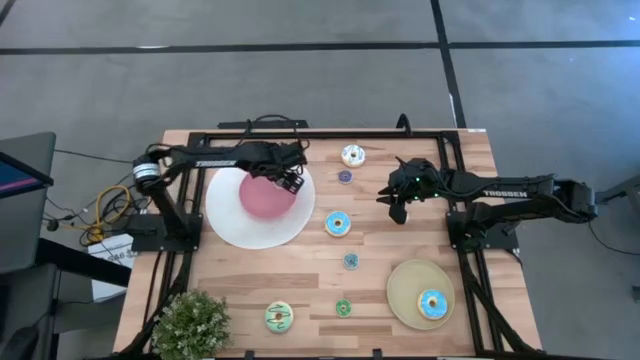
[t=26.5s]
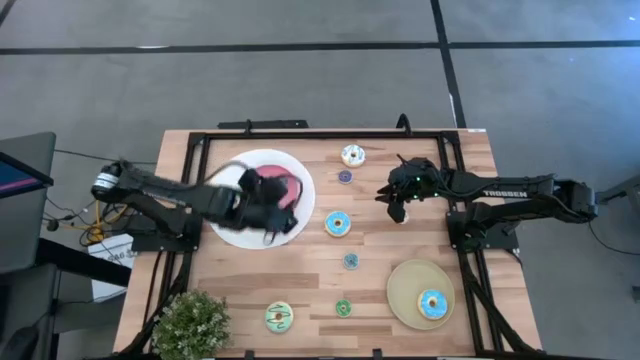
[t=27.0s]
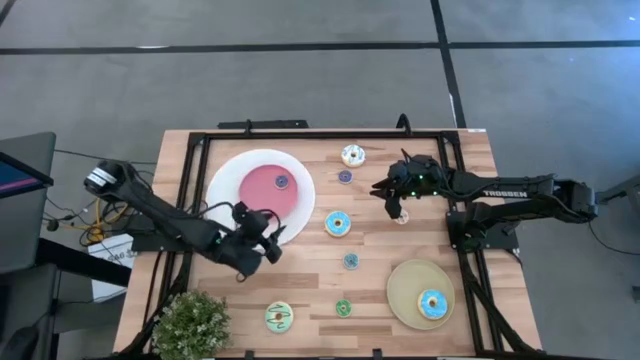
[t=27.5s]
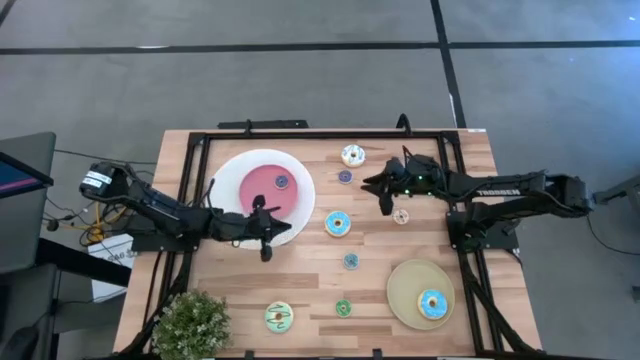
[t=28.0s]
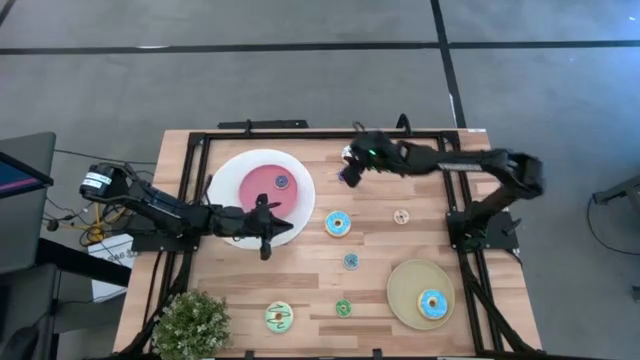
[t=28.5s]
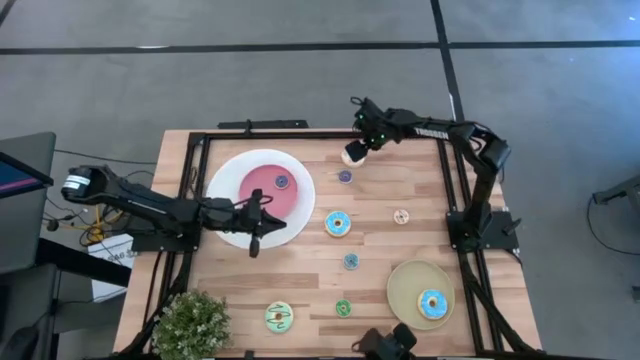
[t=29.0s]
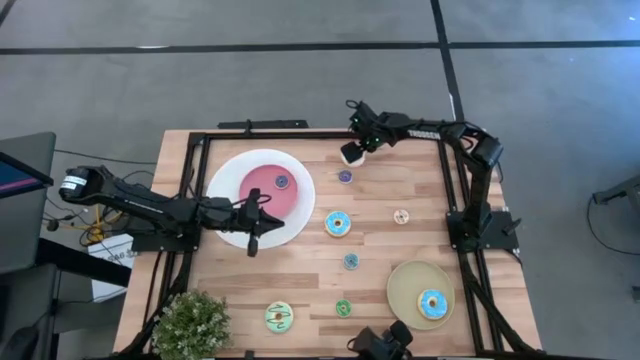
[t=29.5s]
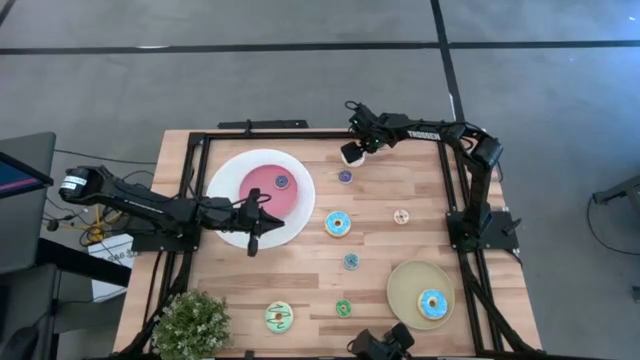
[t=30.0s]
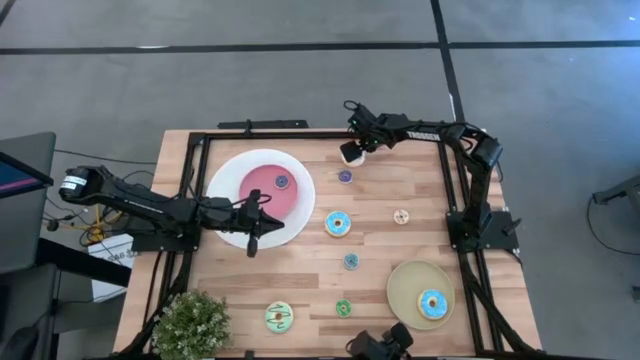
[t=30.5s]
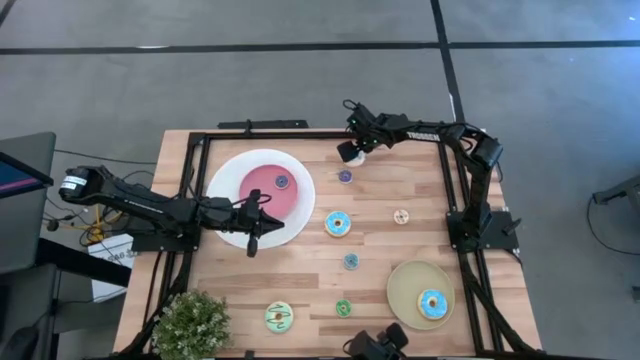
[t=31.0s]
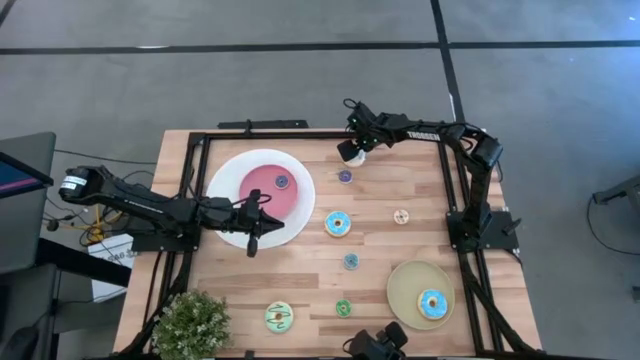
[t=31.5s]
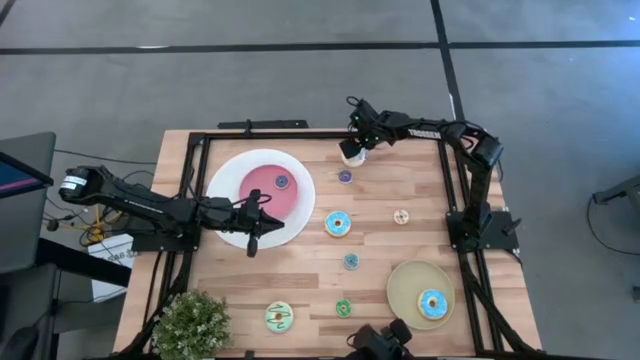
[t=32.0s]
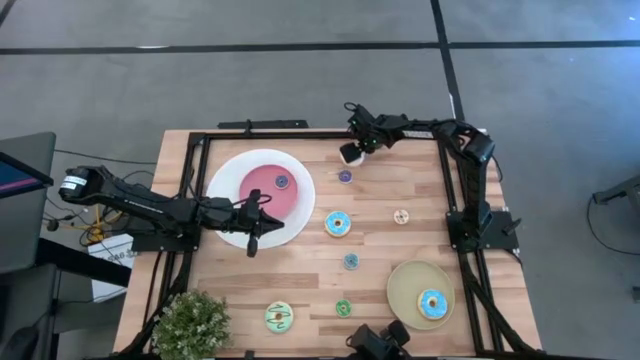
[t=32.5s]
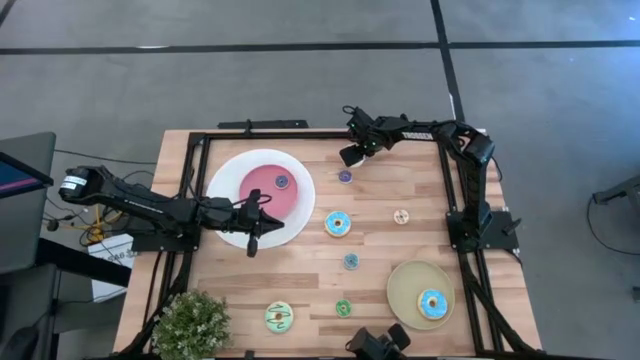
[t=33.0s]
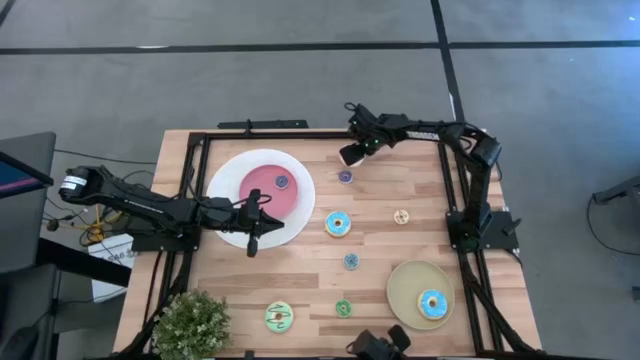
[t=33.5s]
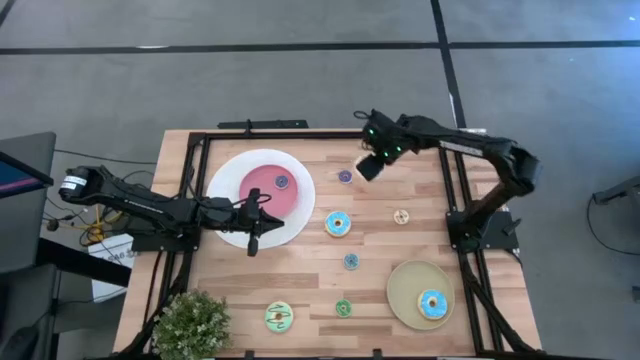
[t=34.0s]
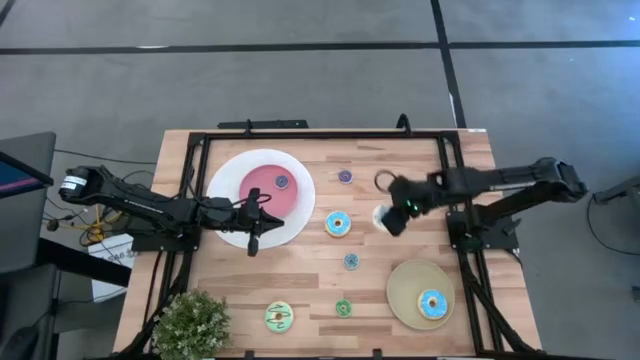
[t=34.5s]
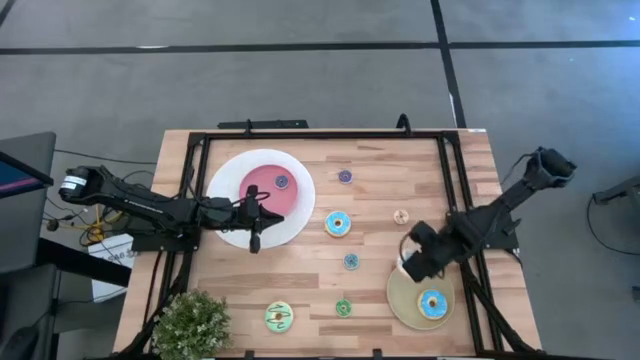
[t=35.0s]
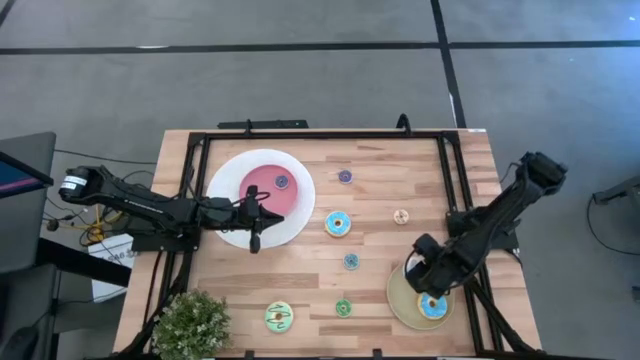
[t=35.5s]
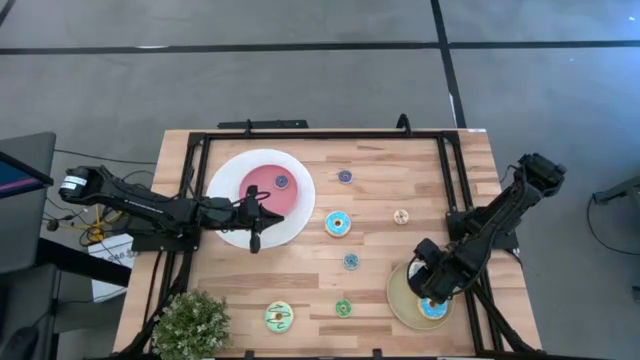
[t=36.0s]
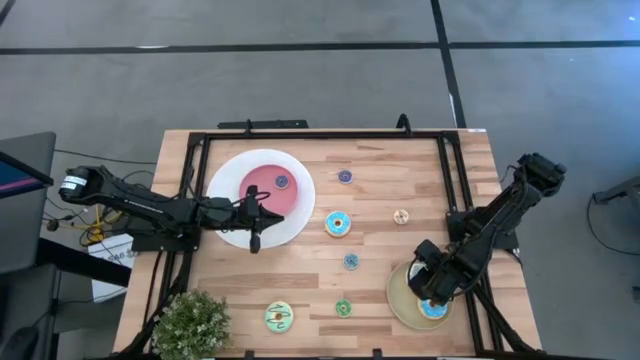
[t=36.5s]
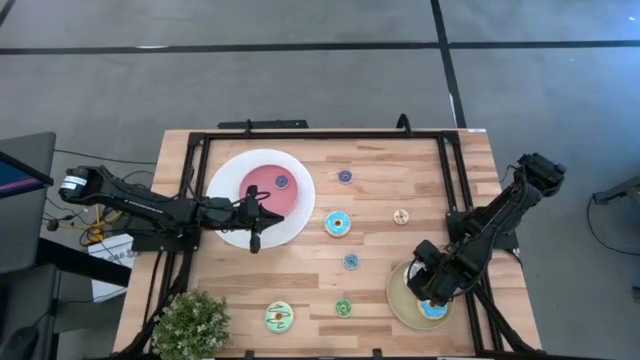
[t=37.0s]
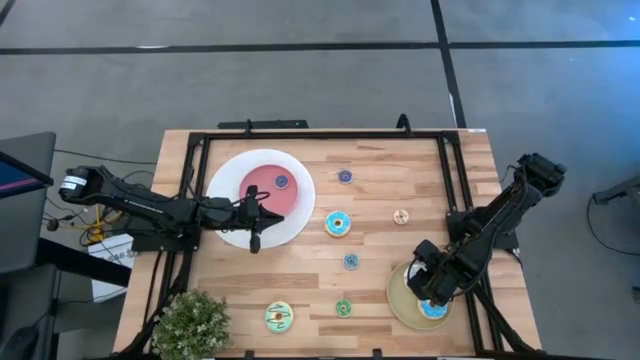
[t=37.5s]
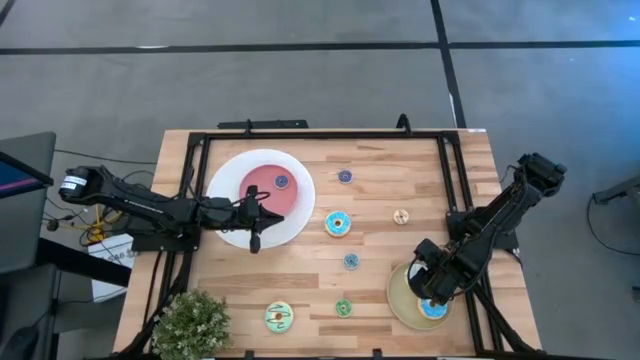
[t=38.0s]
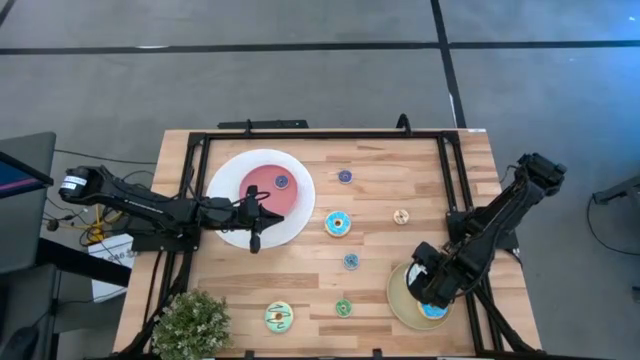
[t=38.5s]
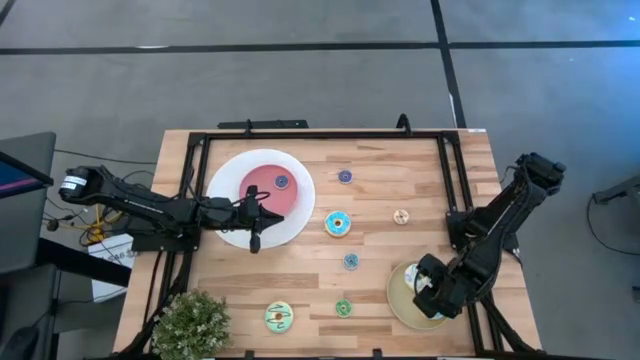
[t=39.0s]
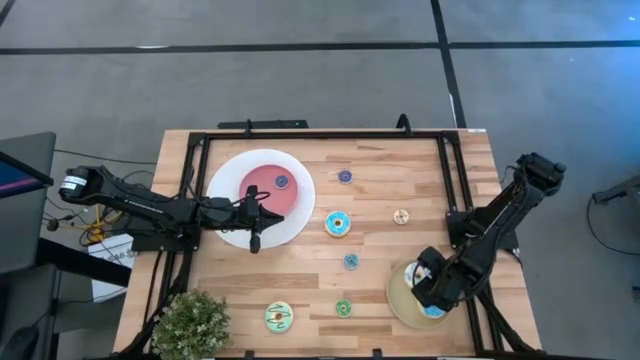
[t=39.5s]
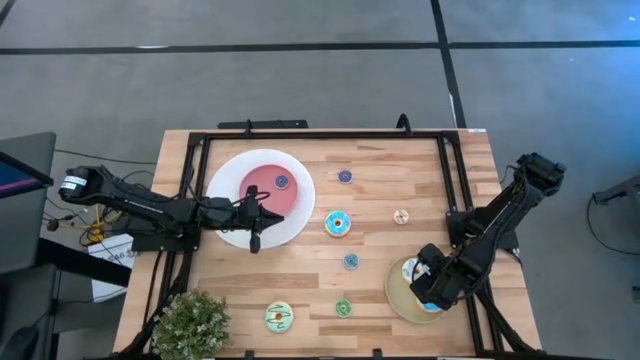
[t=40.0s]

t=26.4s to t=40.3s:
Task: Pick & Place donuts
Put the large white donut onto the brown plate

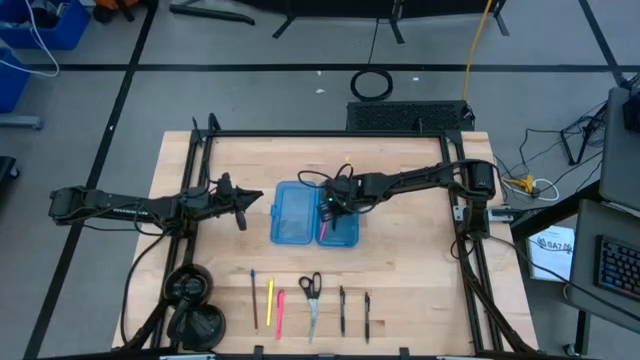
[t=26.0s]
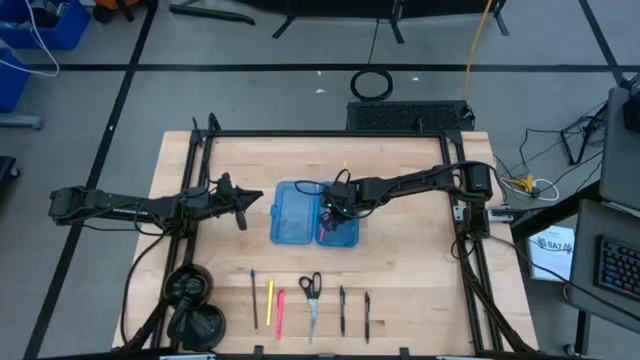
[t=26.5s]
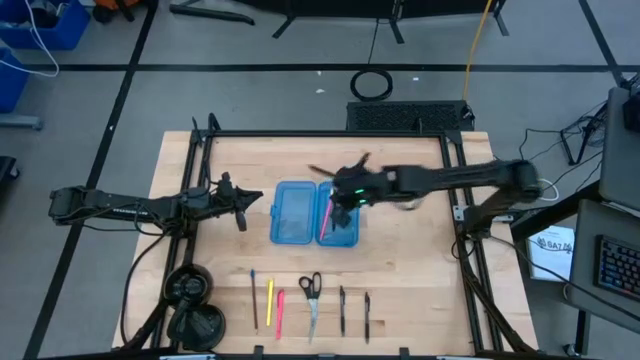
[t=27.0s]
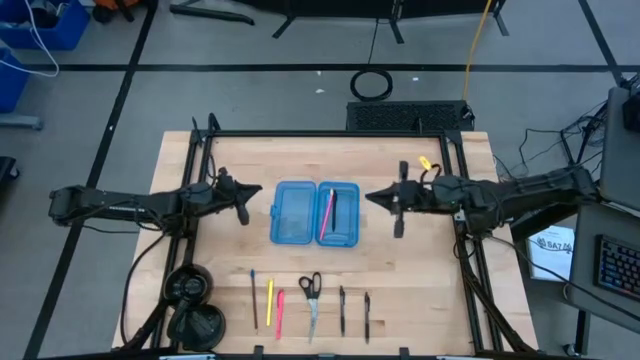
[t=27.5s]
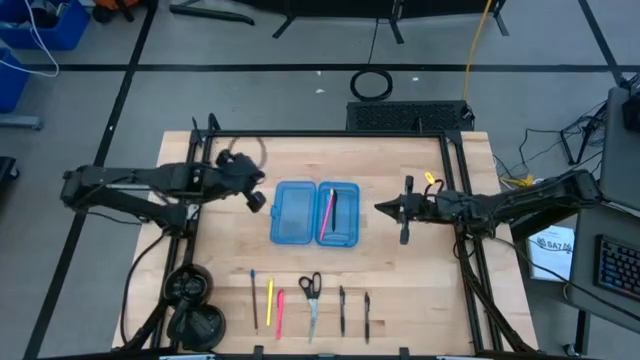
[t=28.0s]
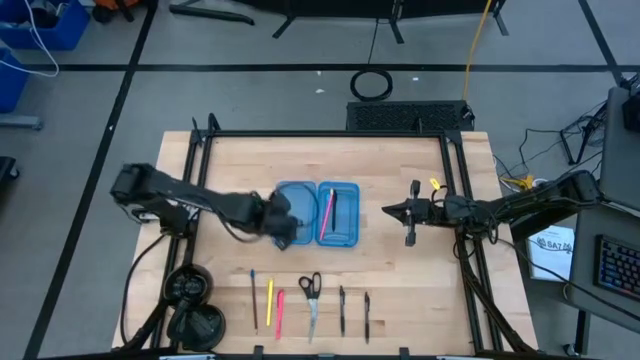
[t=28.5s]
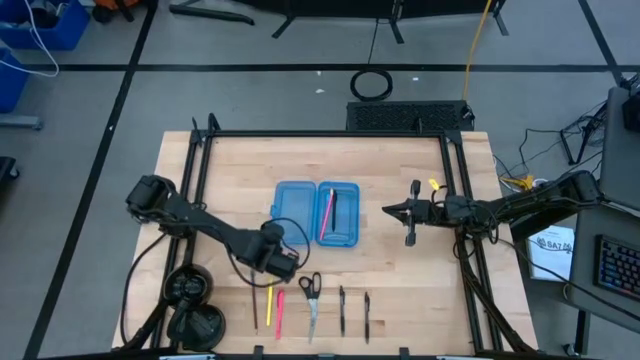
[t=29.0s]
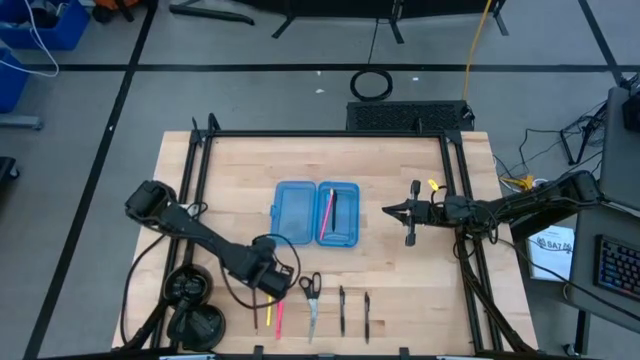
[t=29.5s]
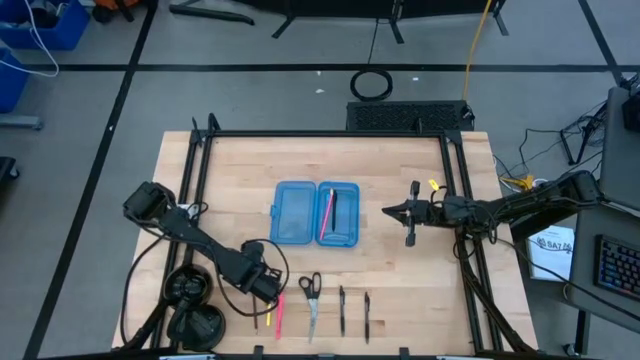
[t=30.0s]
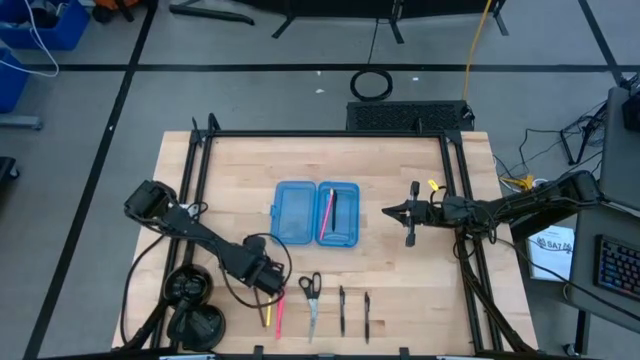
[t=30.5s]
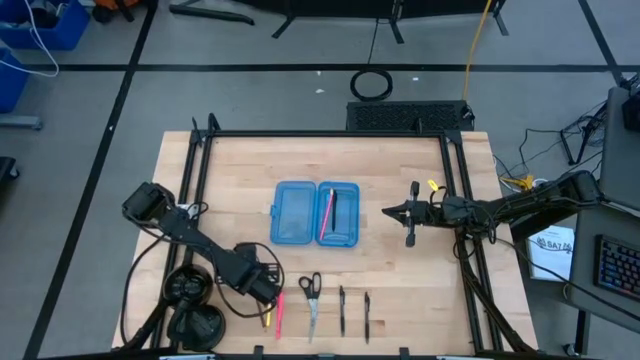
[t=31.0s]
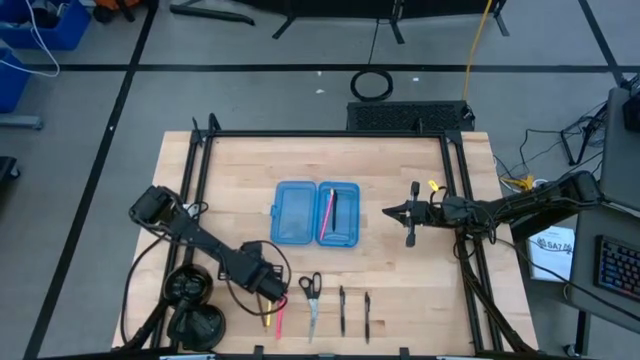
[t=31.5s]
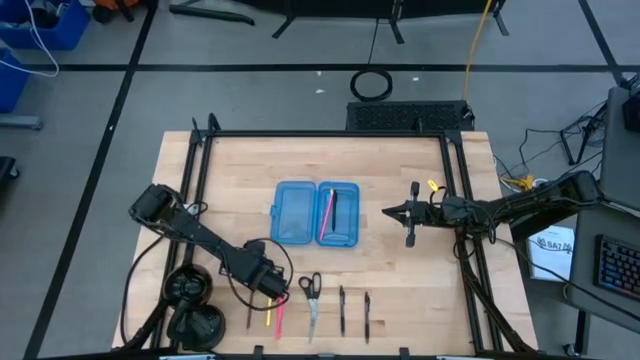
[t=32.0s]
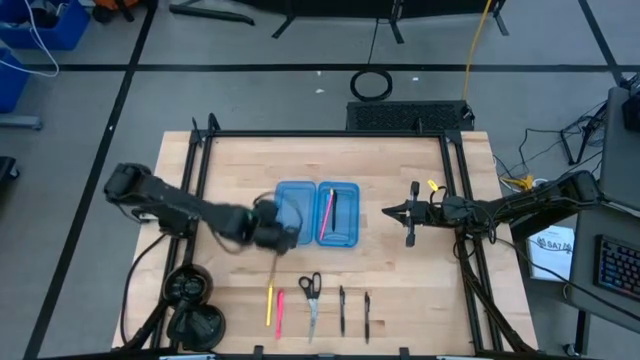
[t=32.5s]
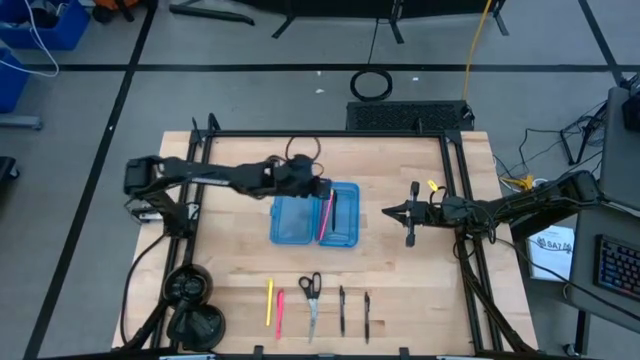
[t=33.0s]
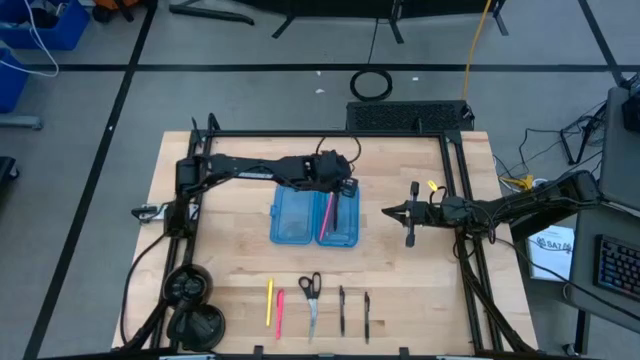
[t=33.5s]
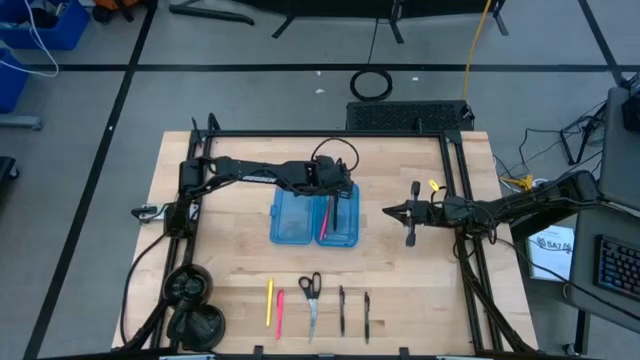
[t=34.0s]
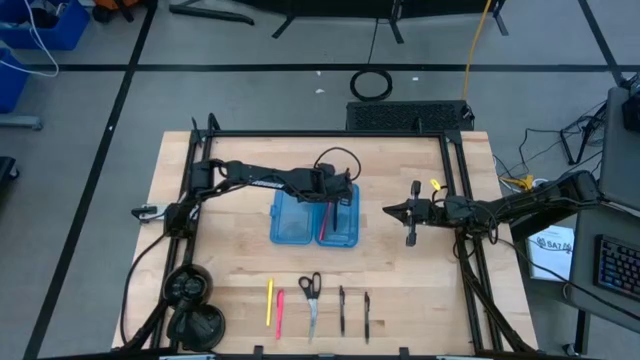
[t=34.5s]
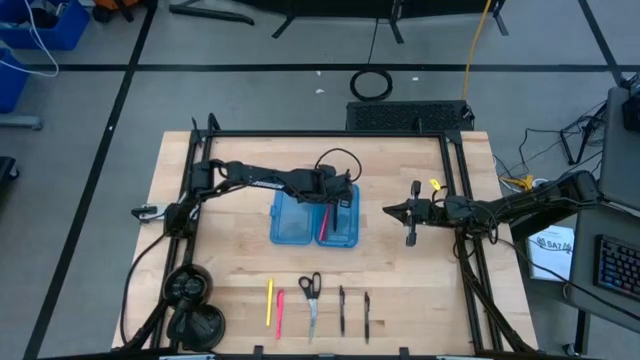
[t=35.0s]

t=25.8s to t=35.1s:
Task: Pick & place school supplies into a supply box
Put the brown pencil into the blue supply box
